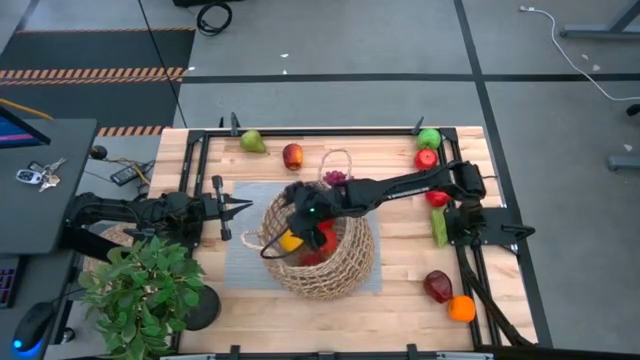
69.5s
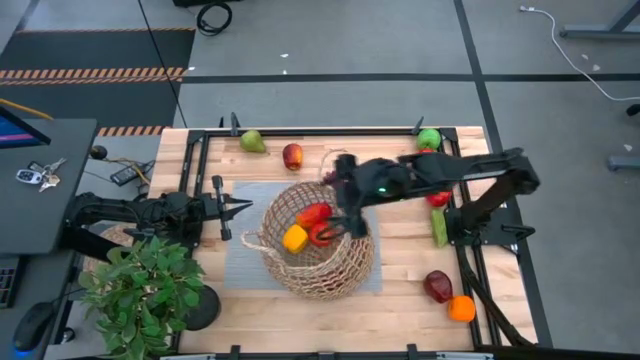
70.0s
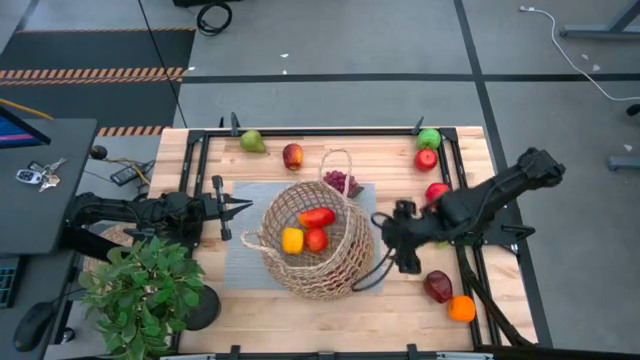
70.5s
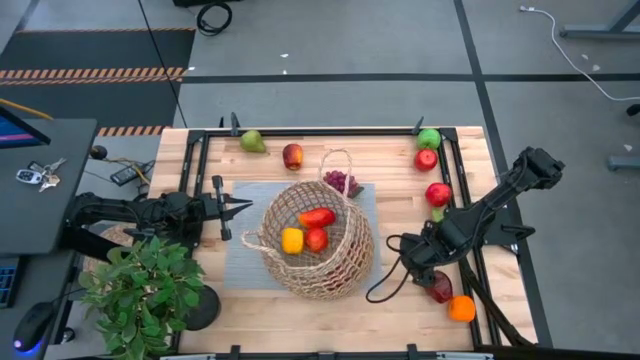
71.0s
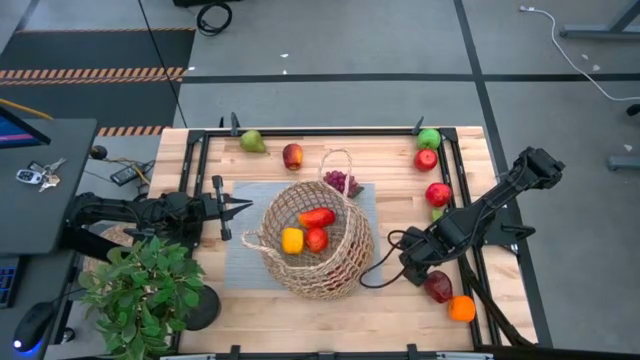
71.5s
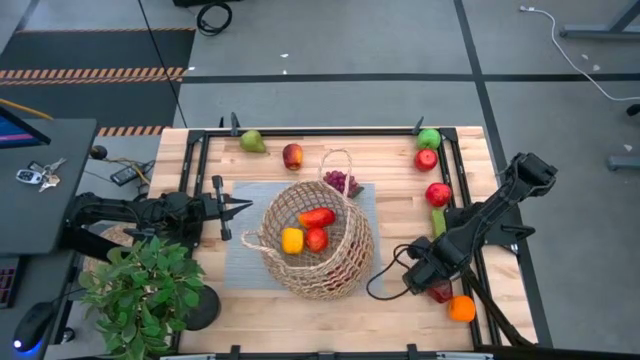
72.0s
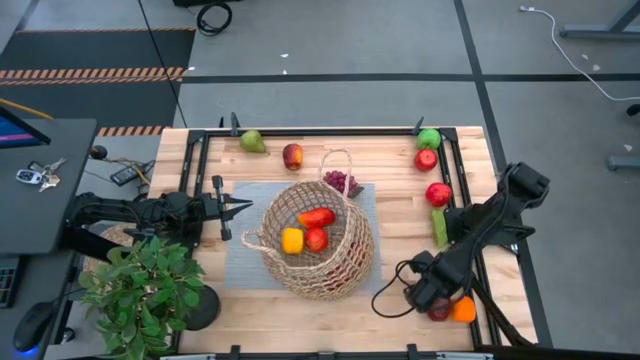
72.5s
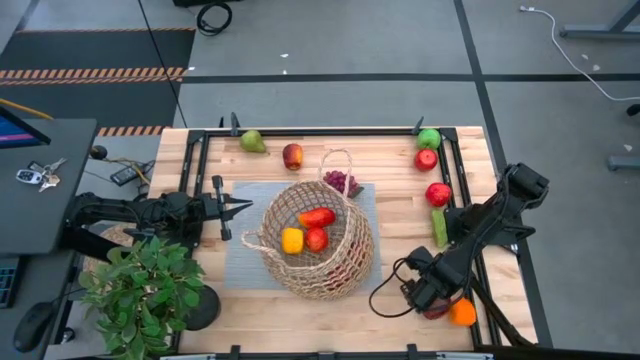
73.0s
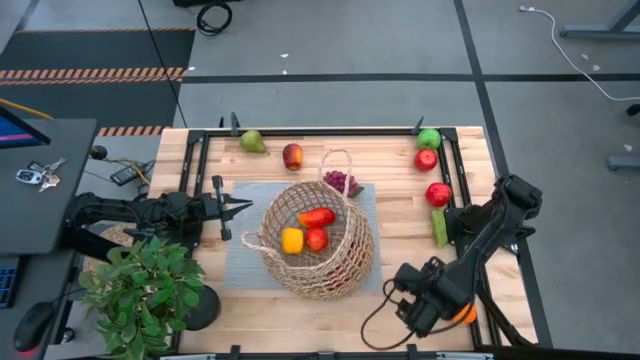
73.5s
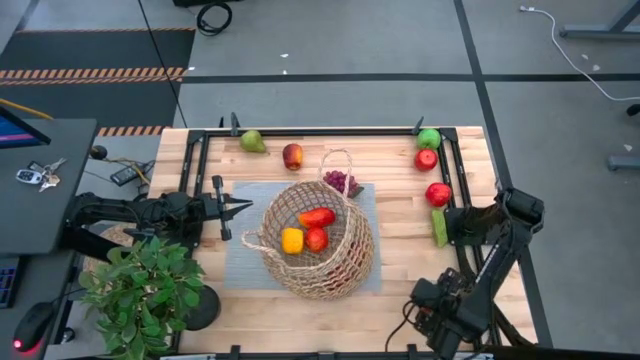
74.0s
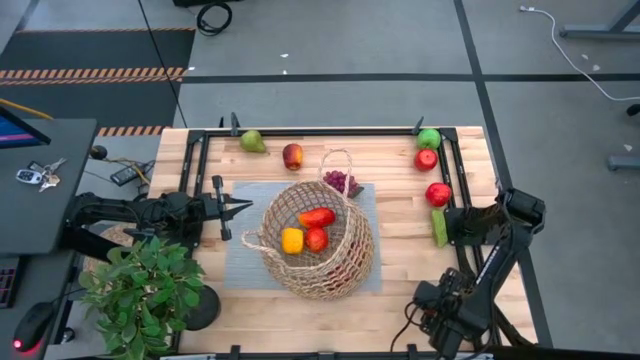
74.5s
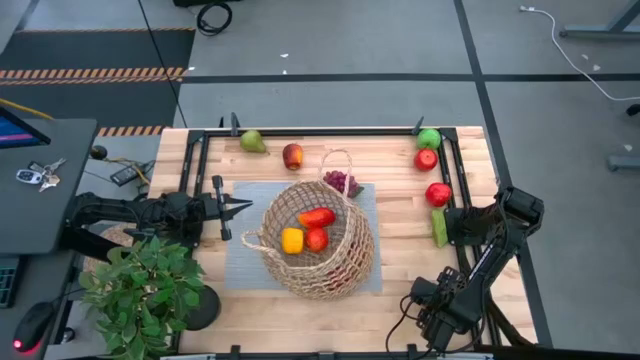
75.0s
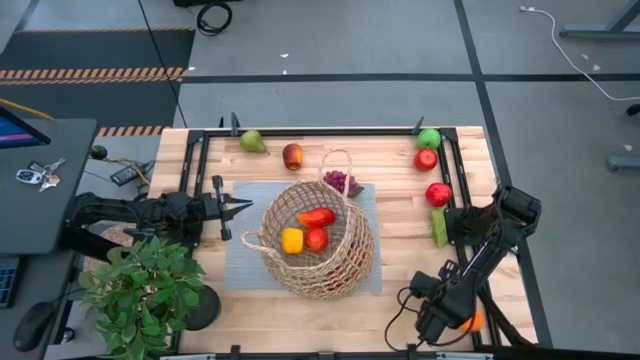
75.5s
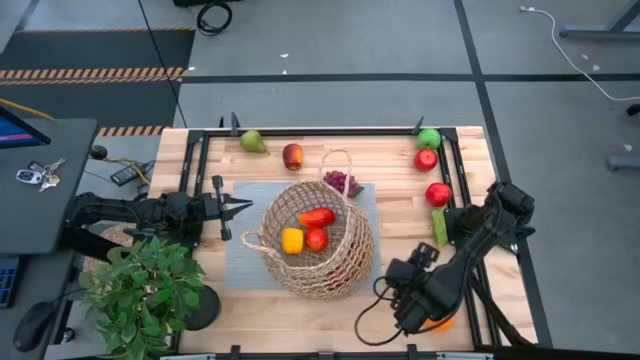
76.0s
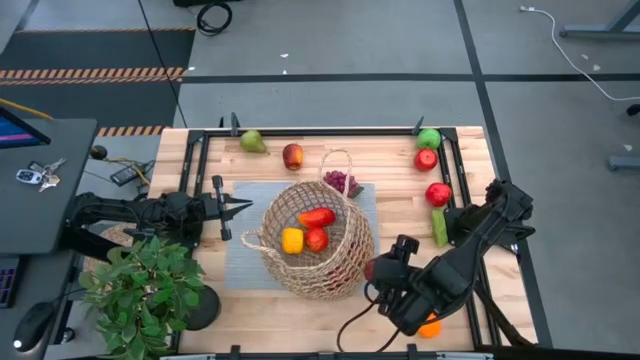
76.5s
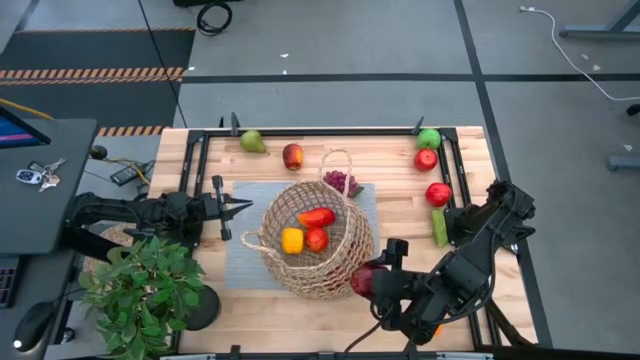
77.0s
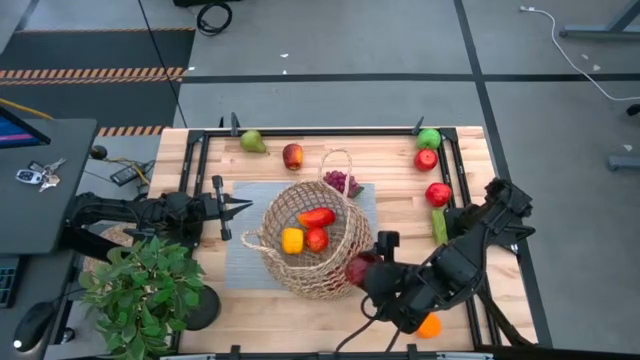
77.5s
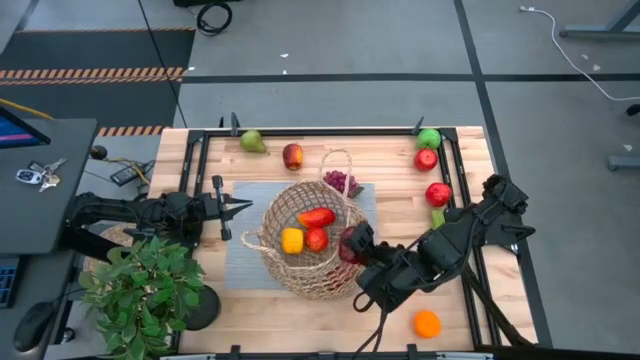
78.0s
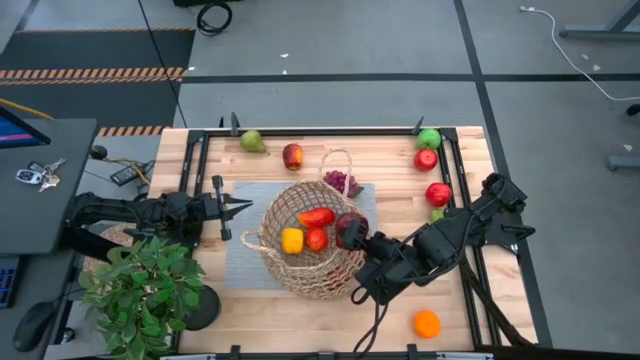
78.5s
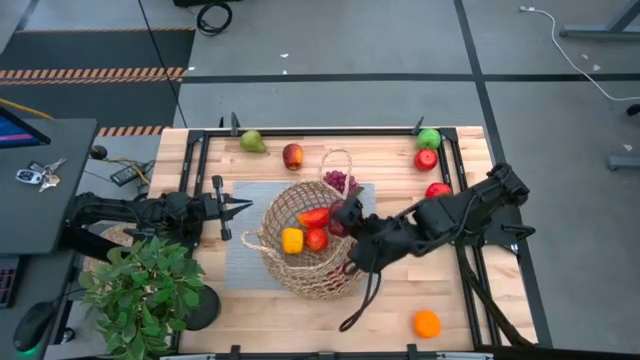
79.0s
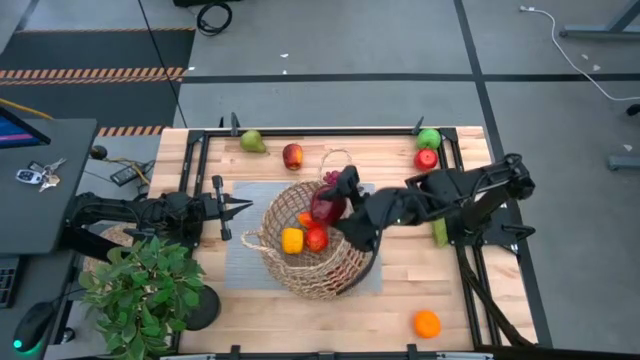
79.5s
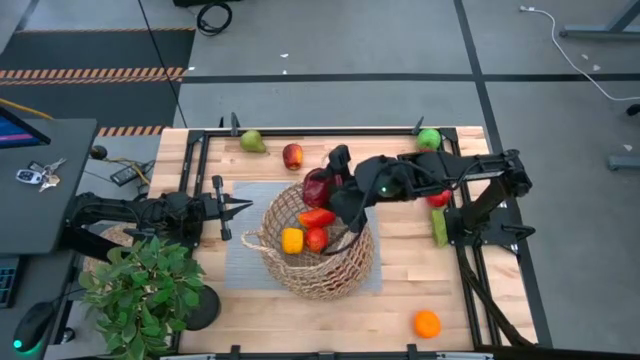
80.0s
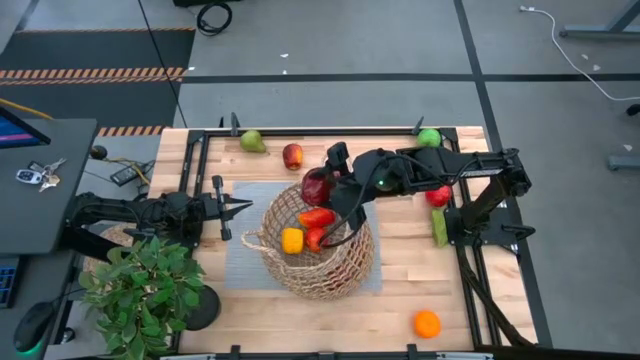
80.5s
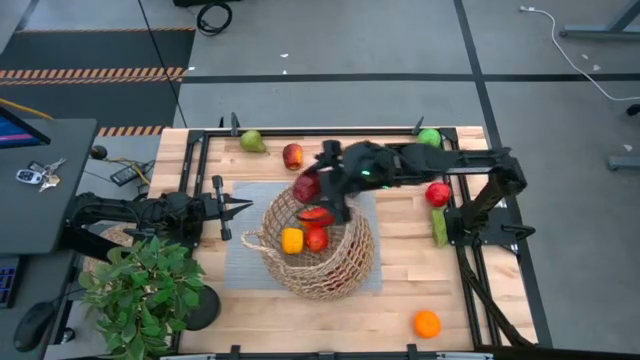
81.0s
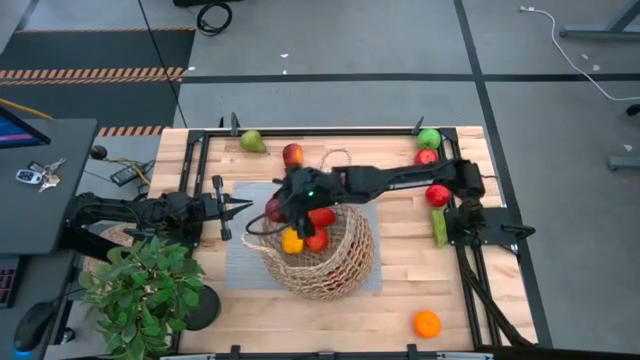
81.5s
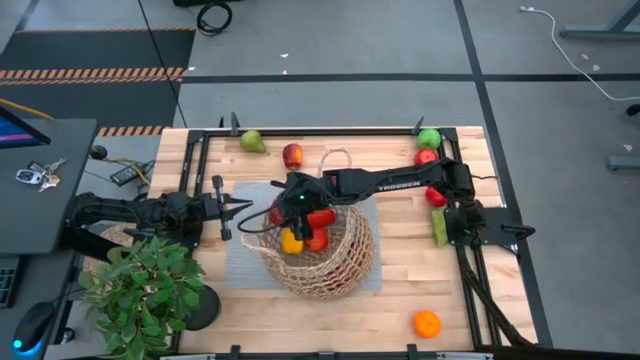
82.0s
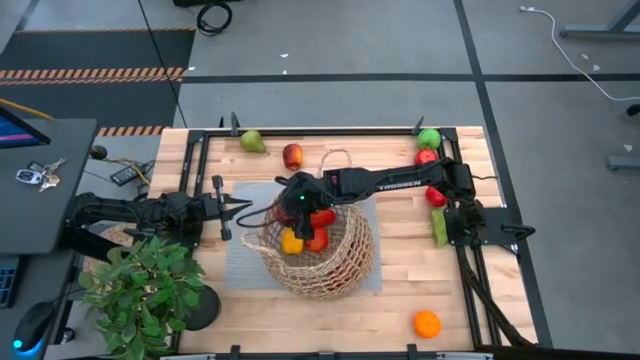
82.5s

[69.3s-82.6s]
Task: Build produce basket
Put the red apple into the brown basket

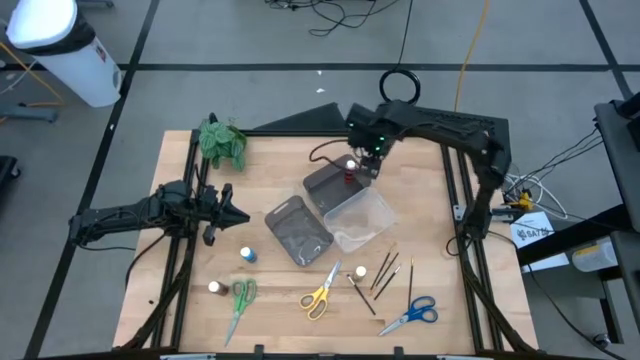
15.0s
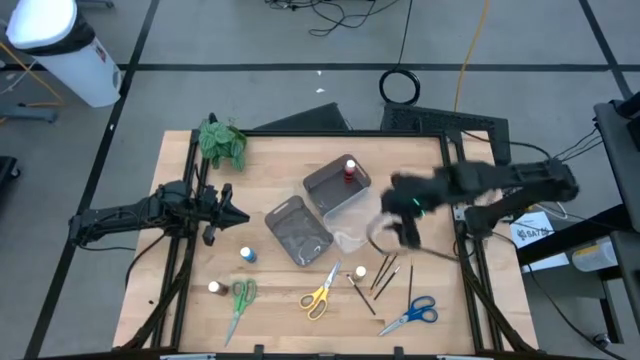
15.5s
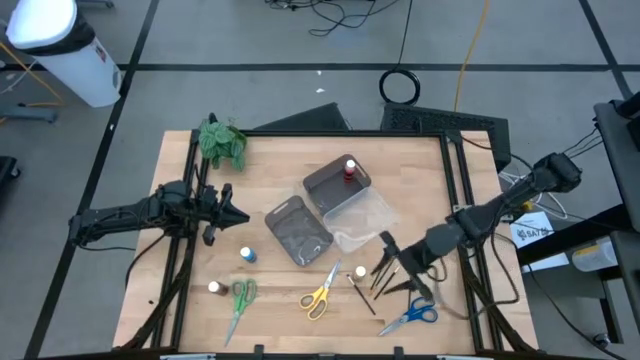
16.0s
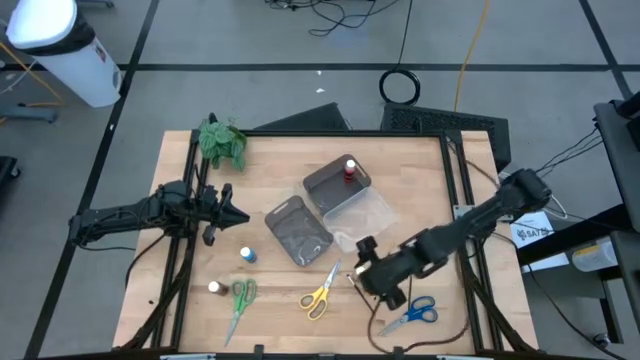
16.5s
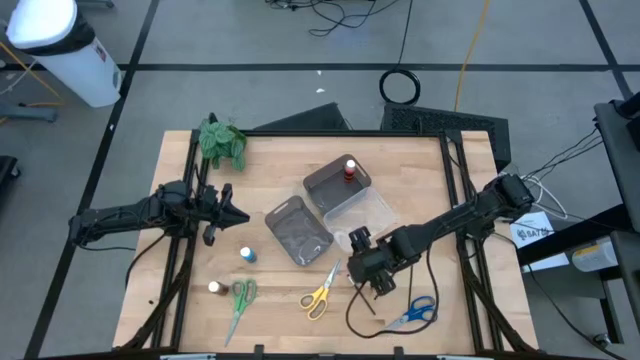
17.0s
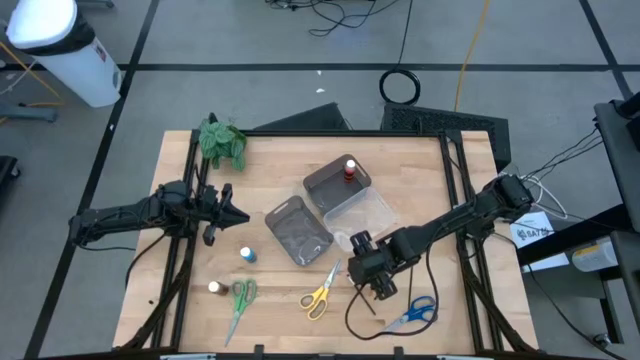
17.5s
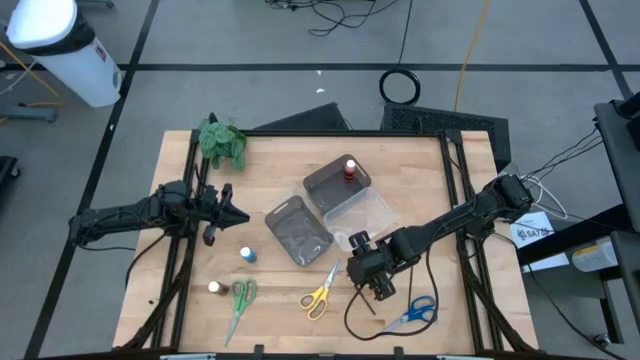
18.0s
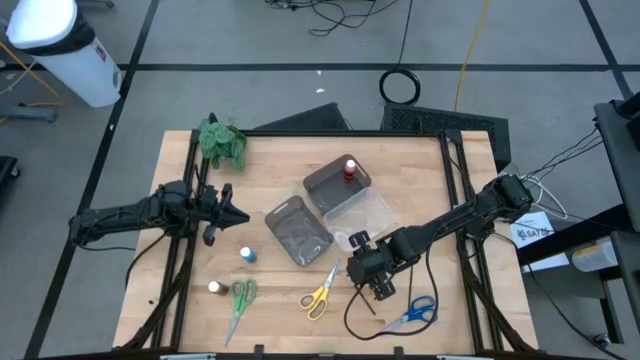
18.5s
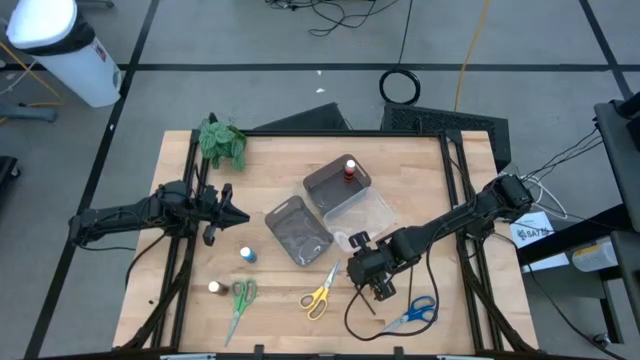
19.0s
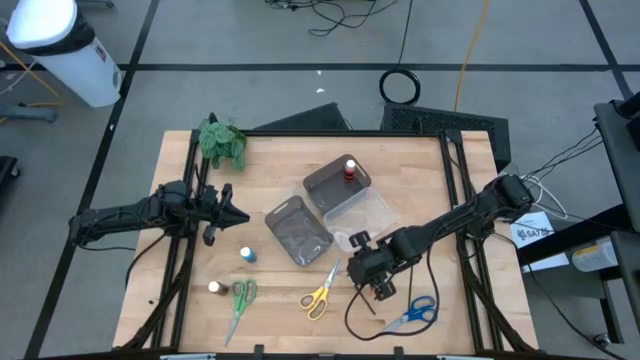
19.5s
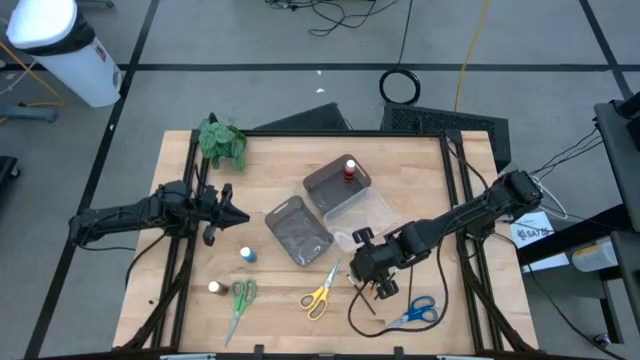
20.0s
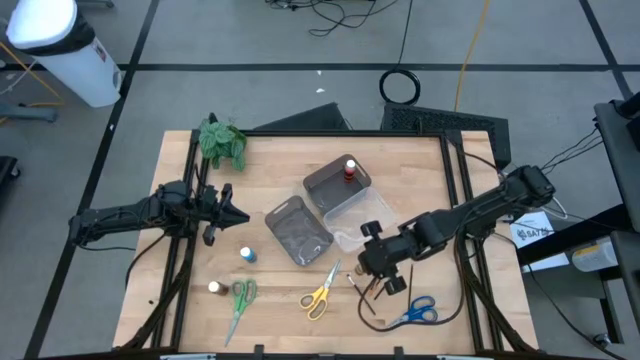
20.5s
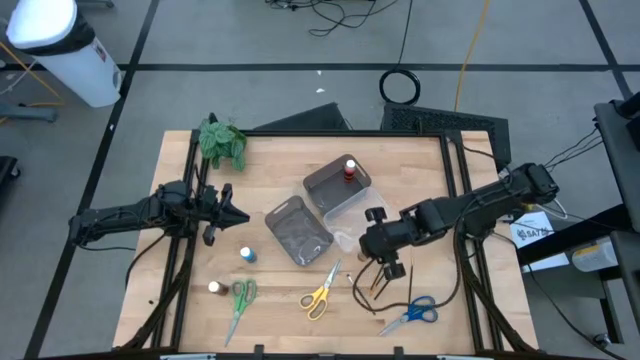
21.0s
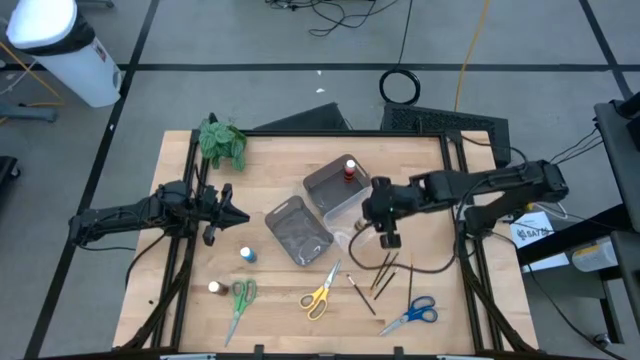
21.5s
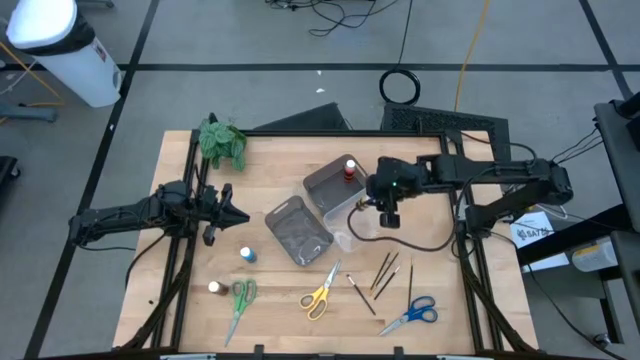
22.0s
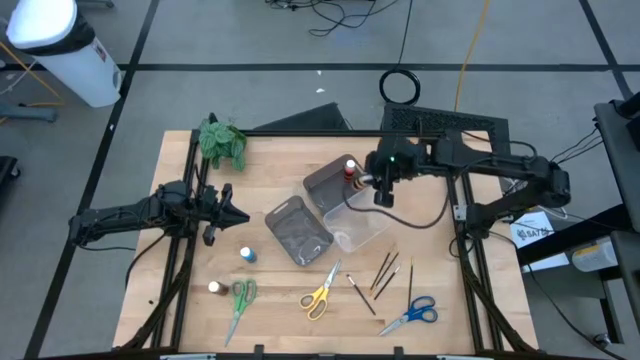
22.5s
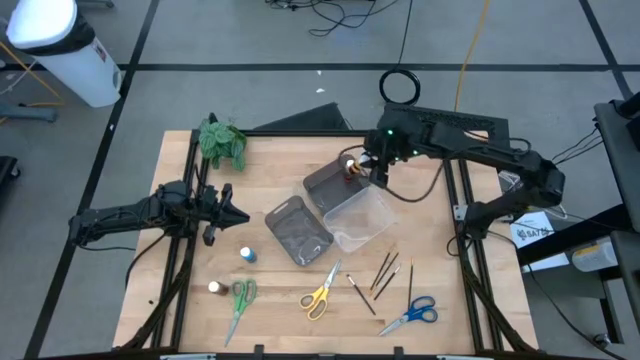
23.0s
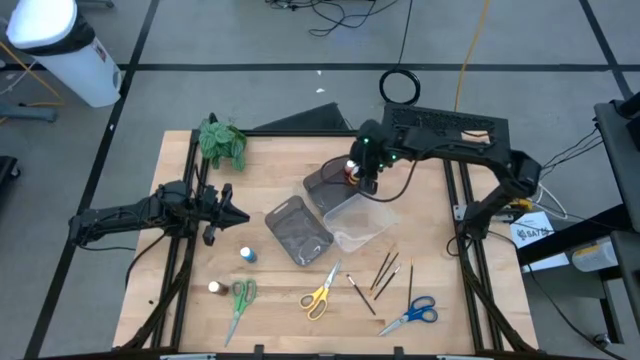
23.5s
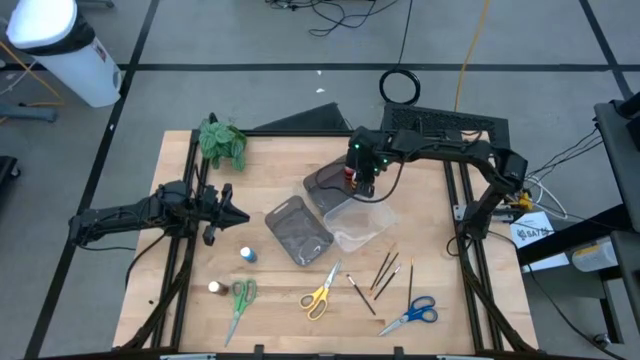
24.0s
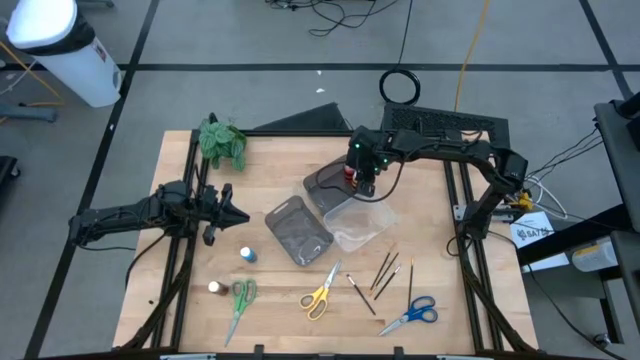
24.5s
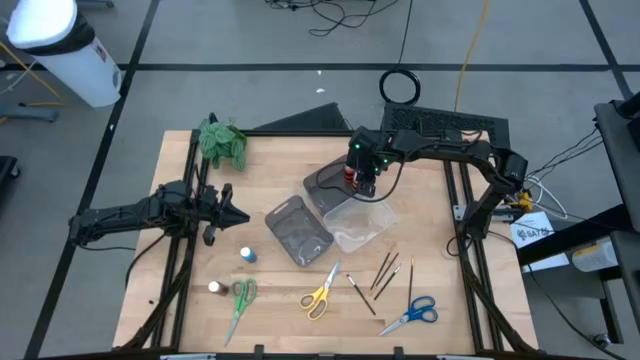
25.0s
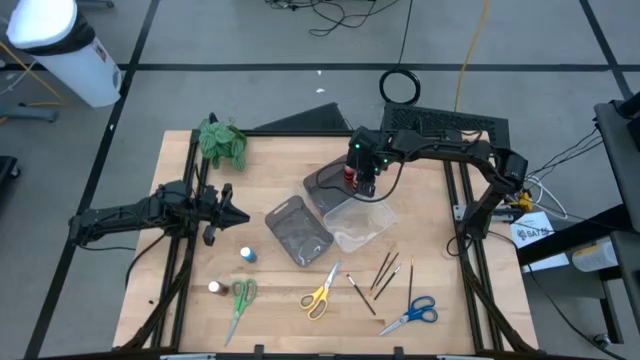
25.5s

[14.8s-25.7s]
Task: Pick & Place Paint Supplies
Put the yellow paint bottle into the top black bin
